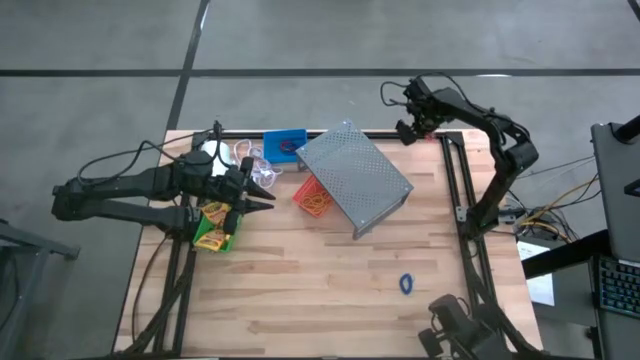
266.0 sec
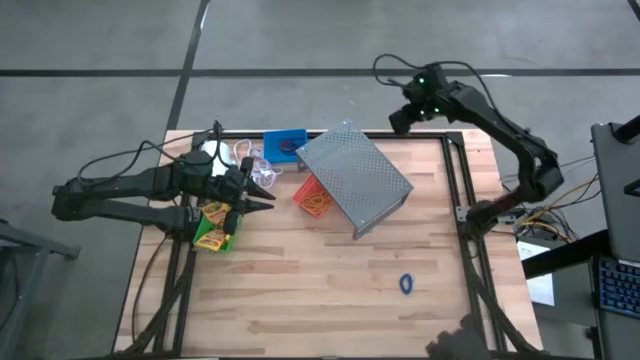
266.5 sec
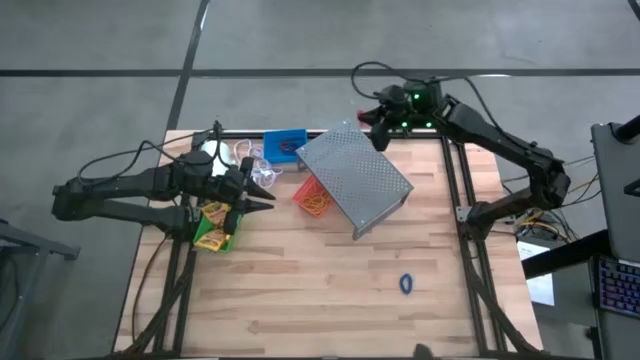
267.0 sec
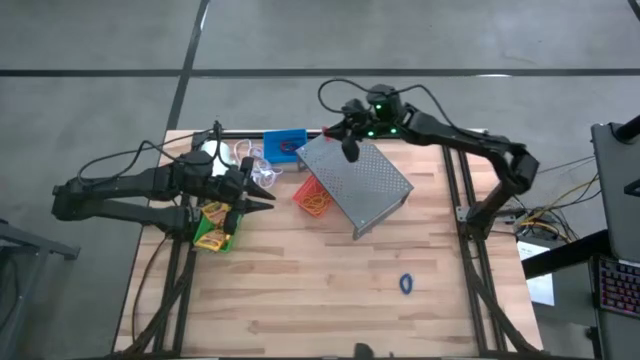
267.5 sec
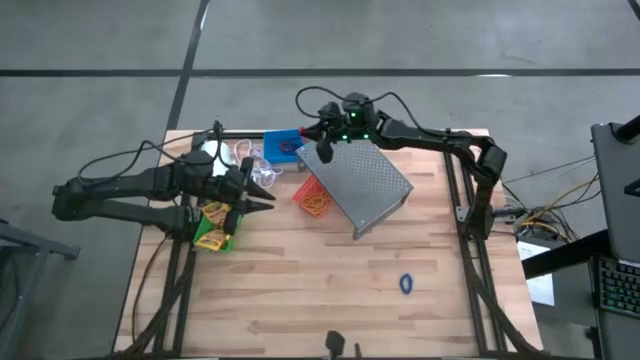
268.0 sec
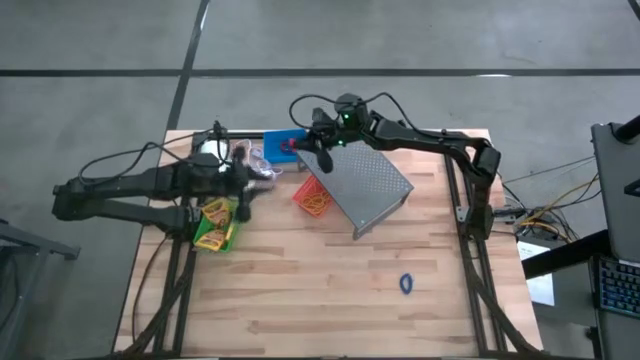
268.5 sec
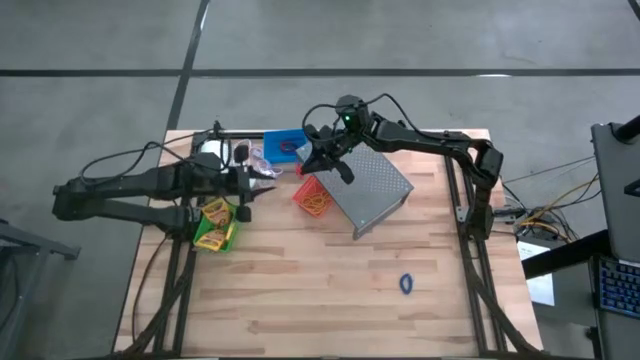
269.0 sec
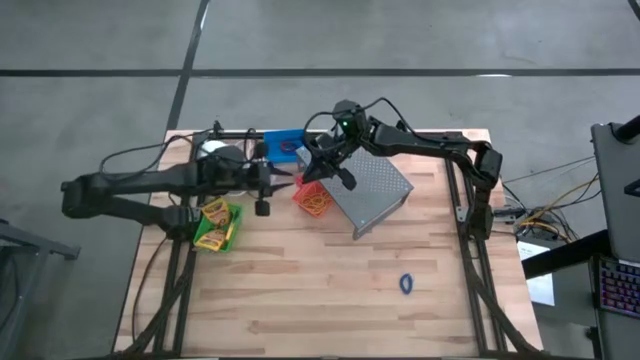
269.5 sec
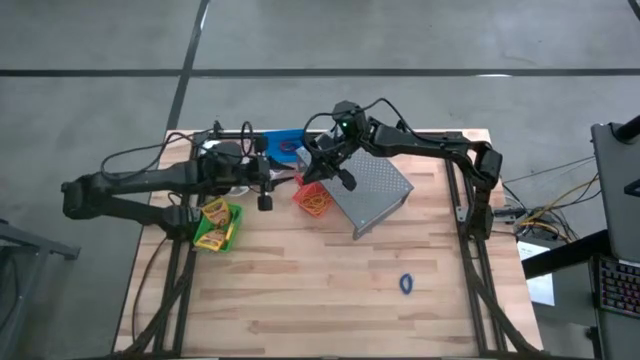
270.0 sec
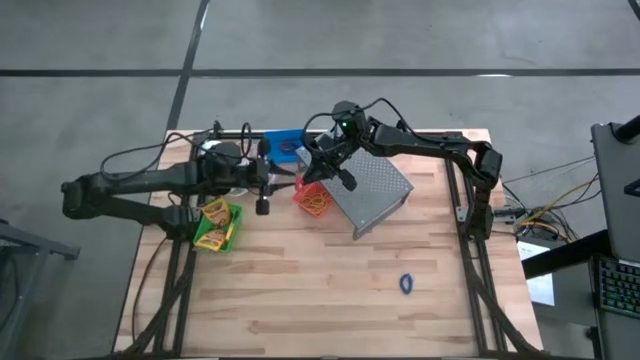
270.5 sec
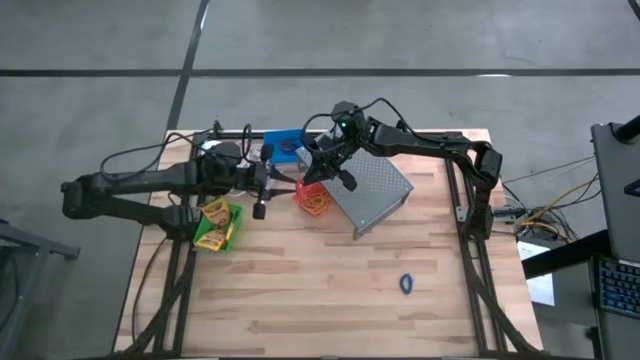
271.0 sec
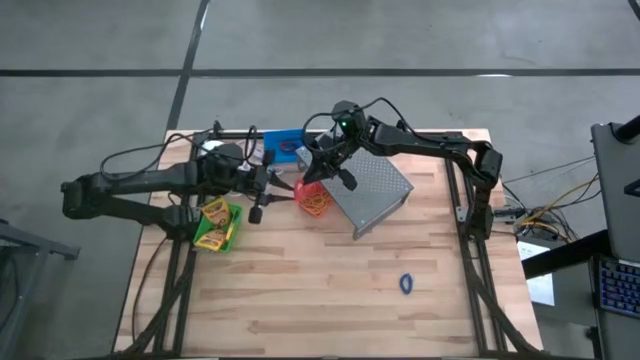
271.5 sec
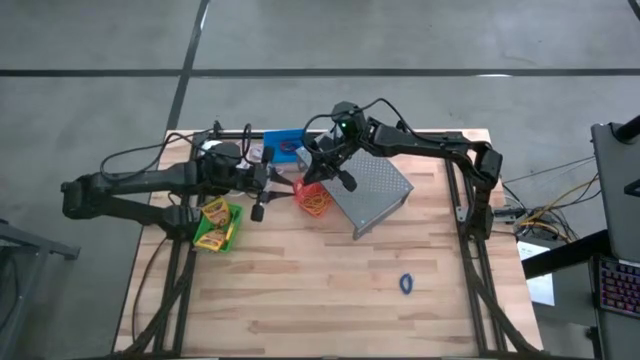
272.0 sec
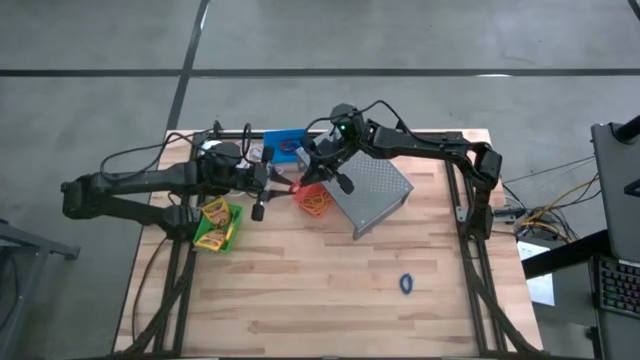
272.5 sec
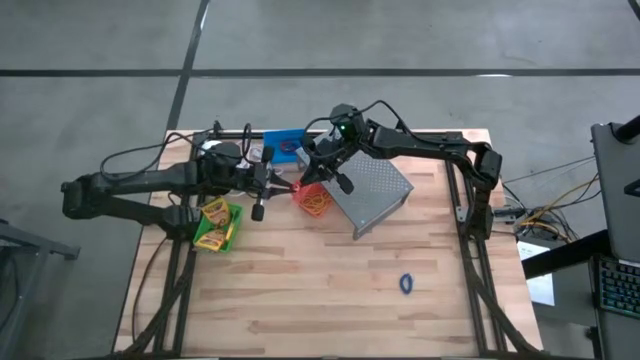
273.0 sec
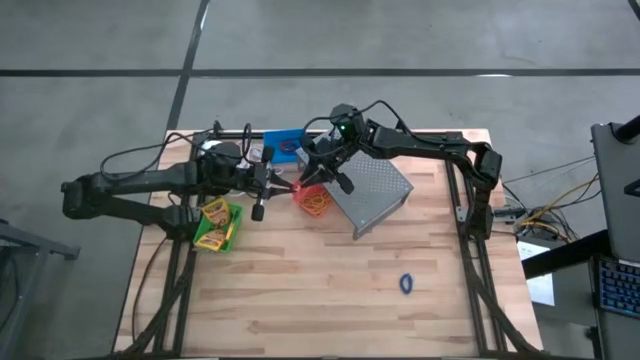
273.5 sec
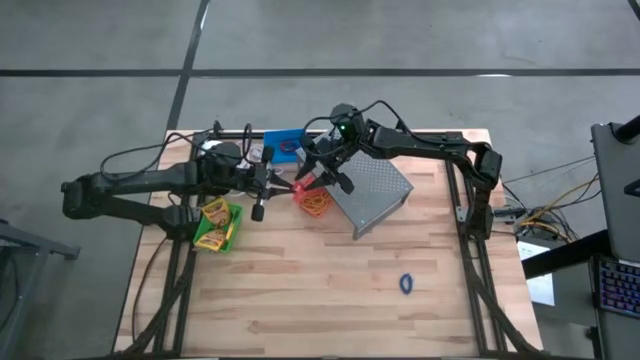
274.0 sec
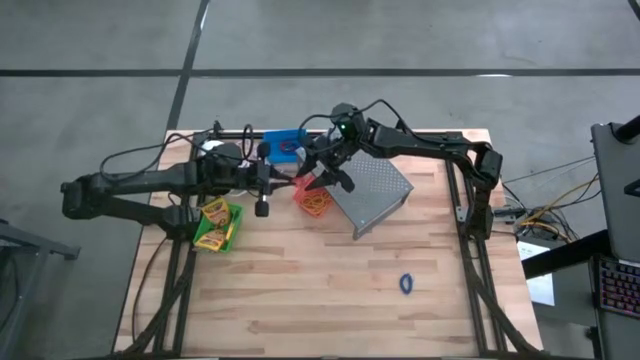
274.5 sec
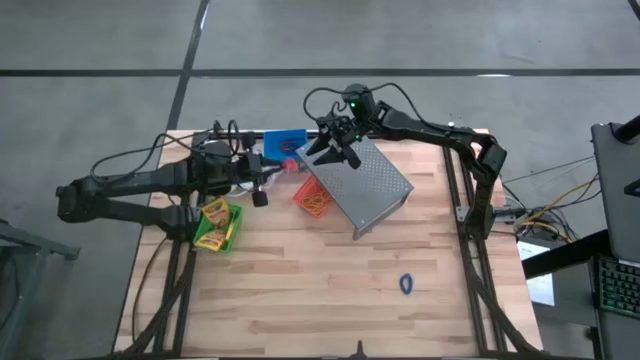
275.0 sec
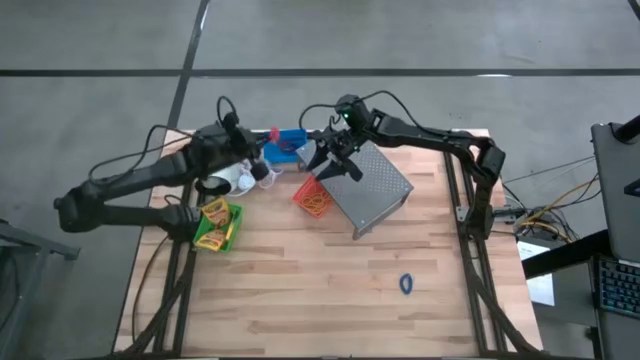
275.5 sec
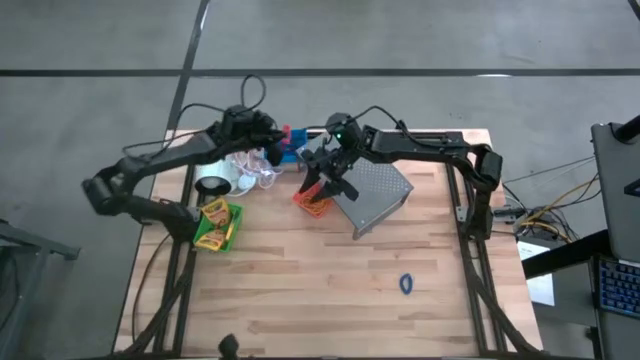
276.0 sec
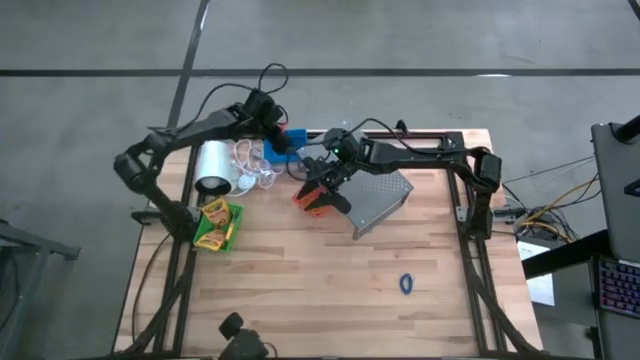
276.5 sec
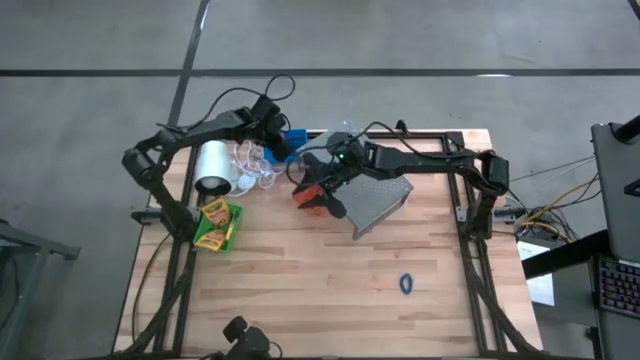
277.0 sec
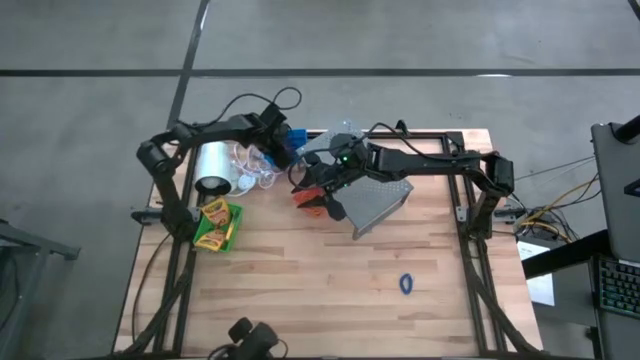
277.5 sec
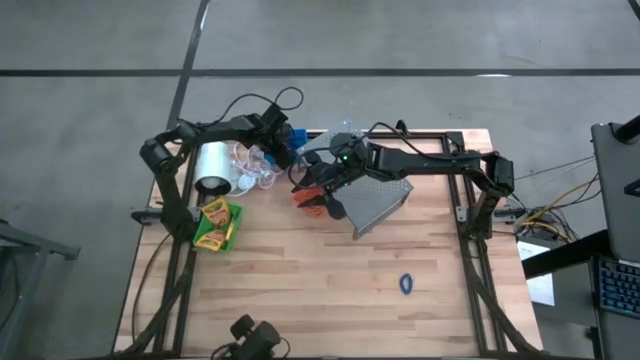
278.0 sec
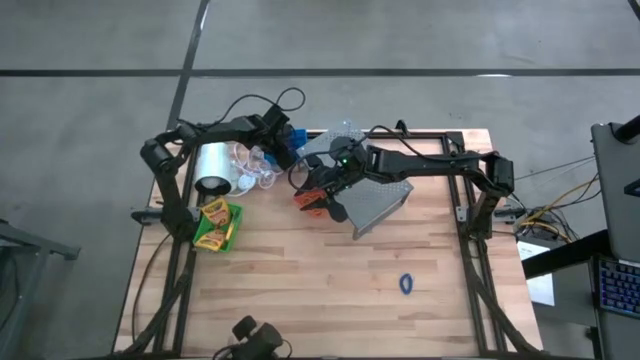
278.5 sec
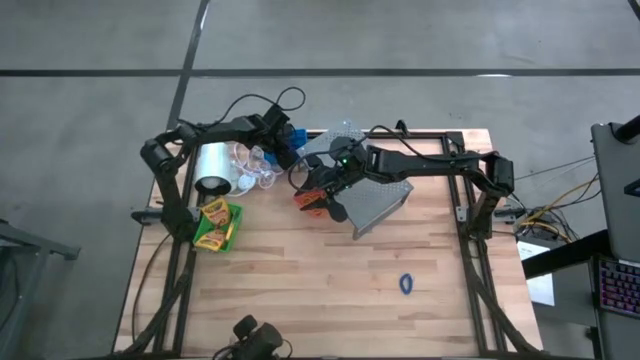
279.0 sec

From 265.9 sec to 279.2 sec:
Task: Pick & Place Office Desk Supplies
Put the orange spring rubber band into the blue bin

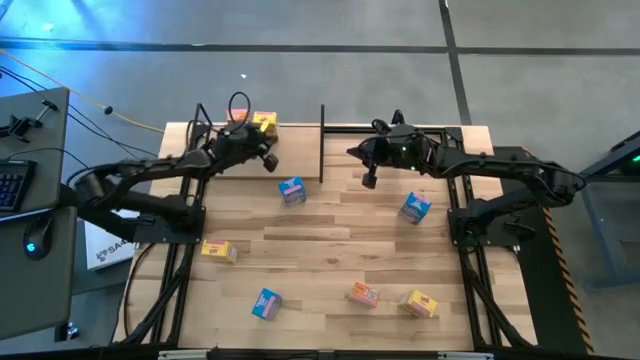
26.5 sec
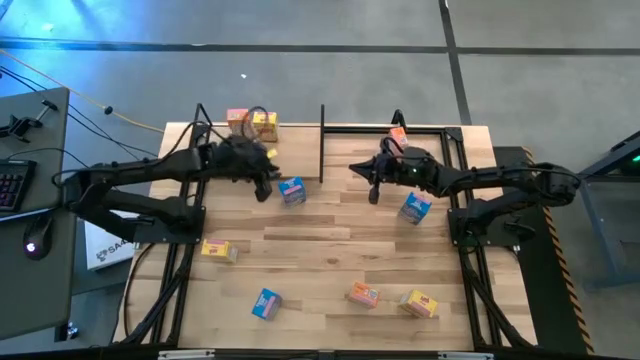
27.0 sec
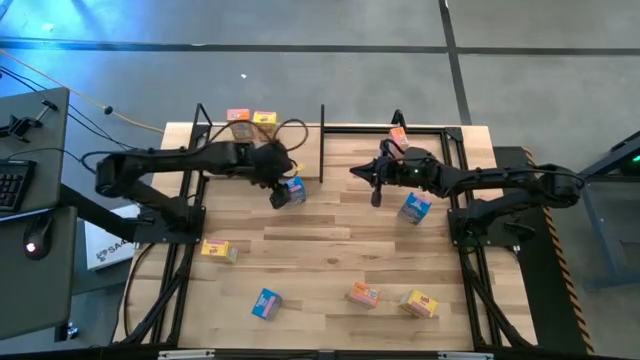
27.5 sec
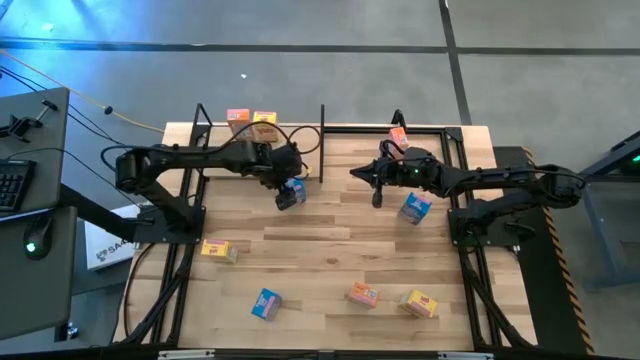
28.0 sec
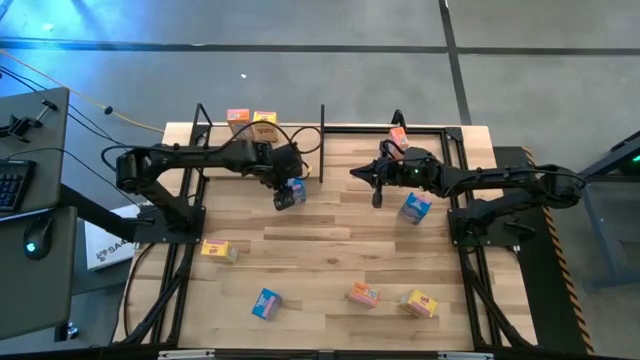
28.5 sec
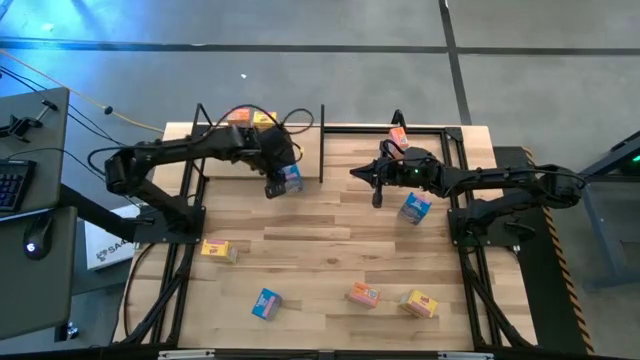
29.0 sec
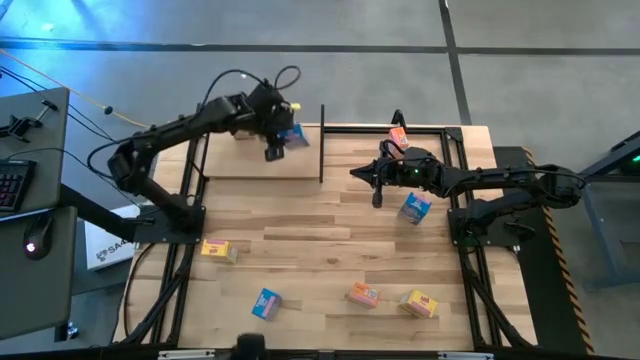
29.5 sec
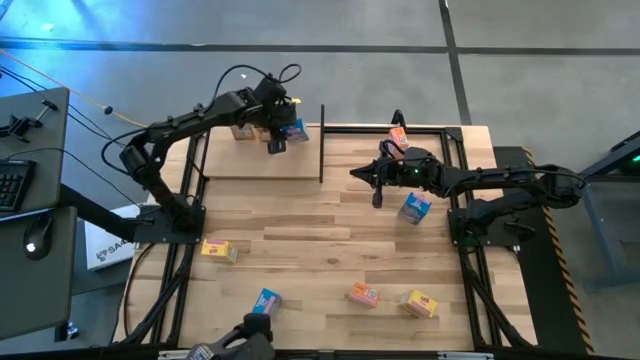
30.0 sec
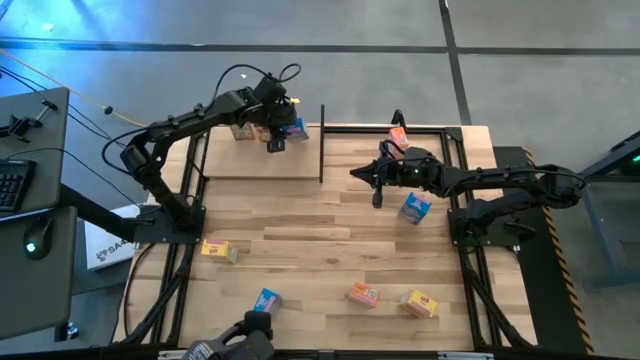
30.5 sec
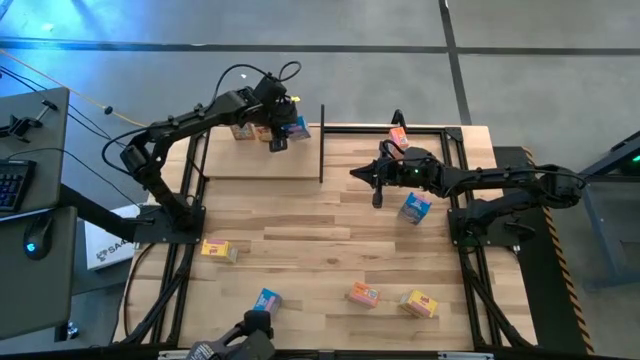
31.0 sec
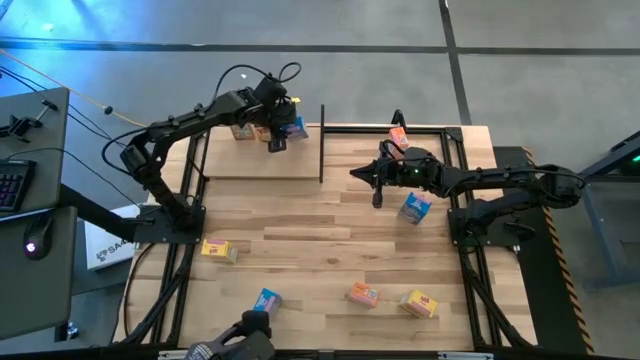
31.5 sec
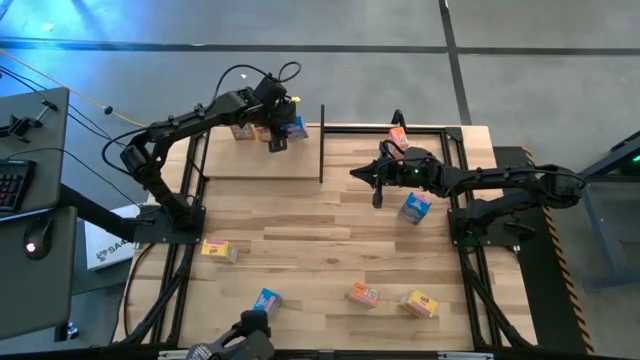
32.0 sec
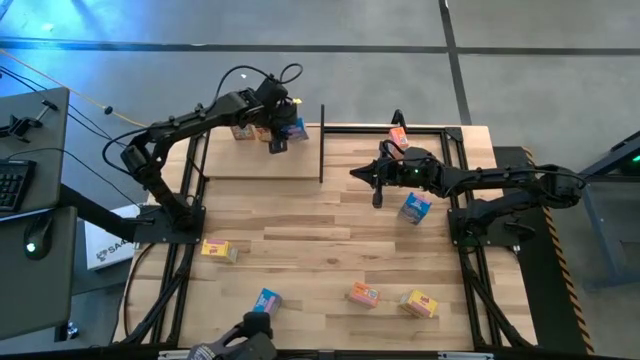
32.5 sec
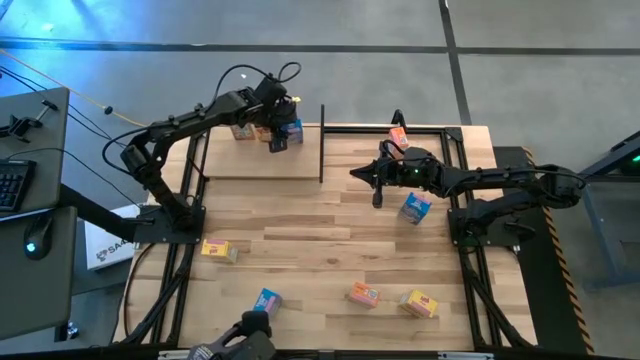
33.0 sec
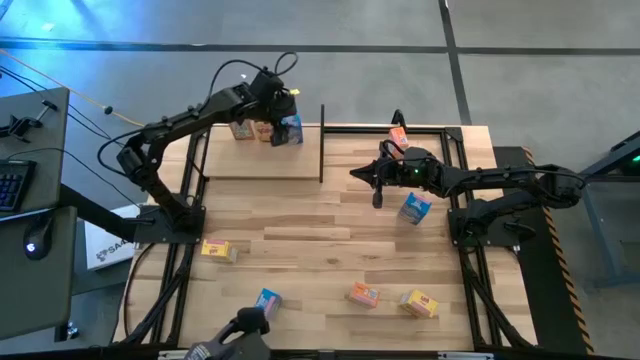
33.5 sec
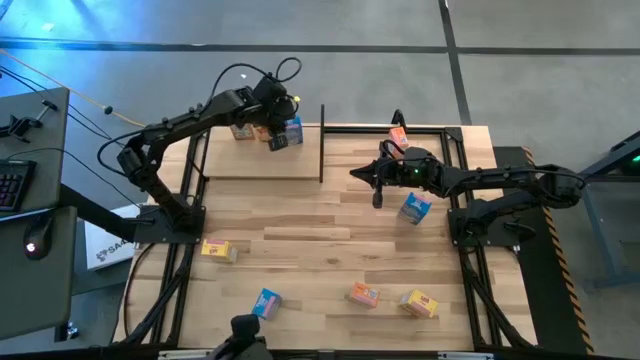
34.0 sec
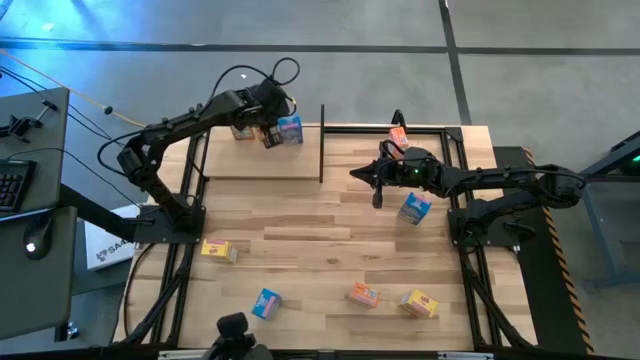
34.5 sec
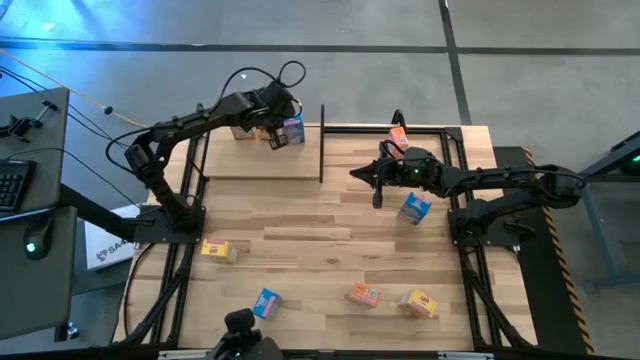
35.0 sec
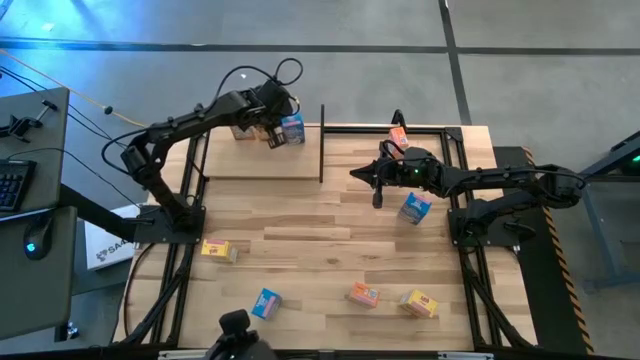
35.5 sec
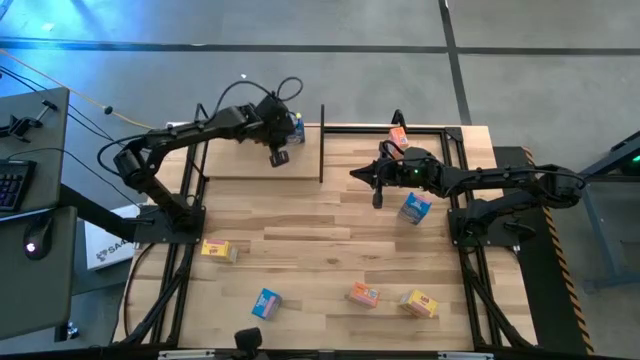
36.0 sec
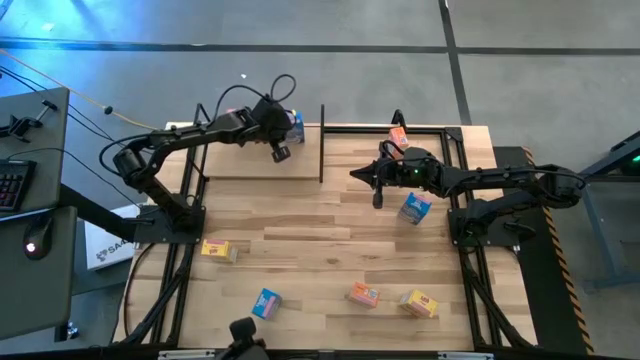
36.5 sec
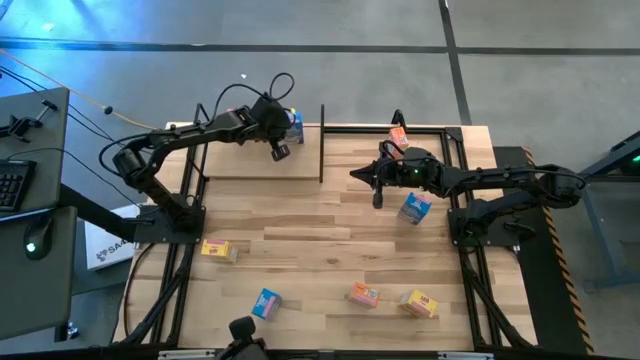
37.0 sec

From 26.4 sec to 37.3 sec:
Task: Stack cereal on shelf
Put the top left blue cereal box on the shelf
